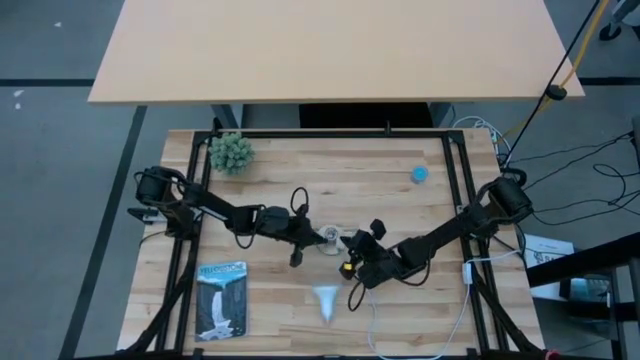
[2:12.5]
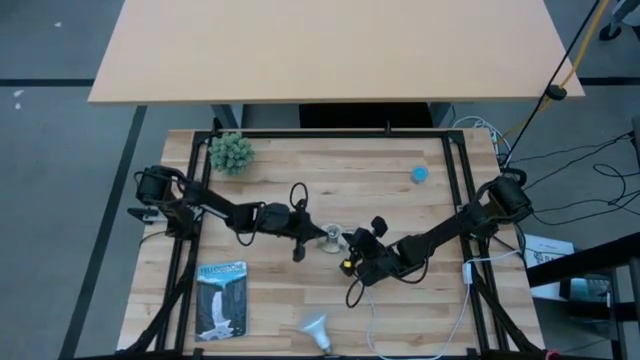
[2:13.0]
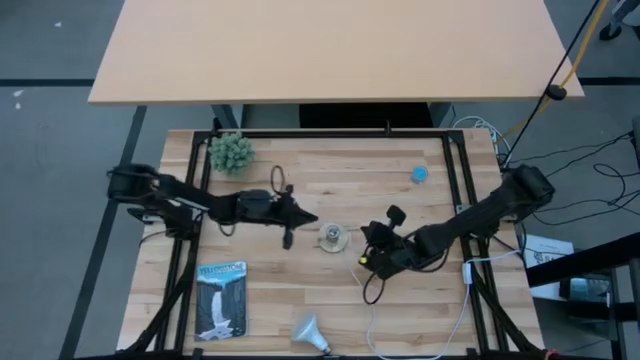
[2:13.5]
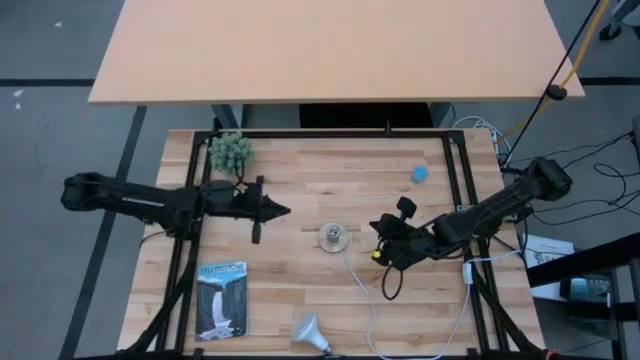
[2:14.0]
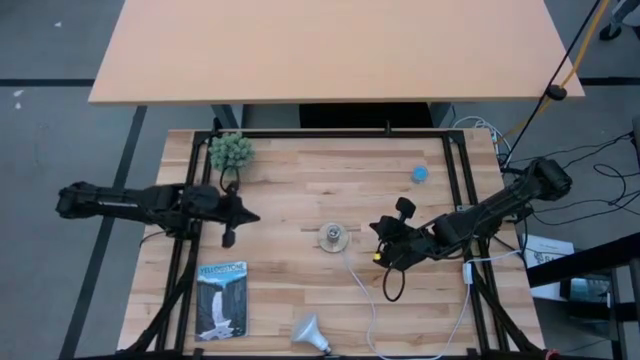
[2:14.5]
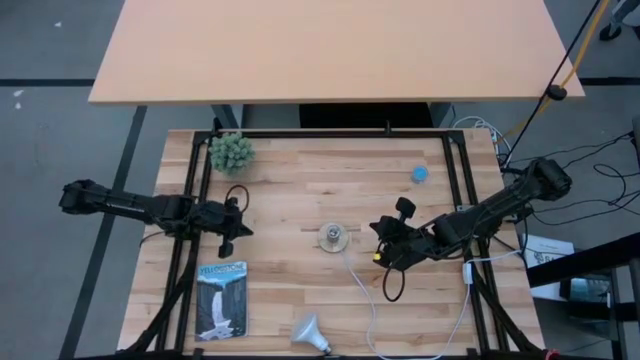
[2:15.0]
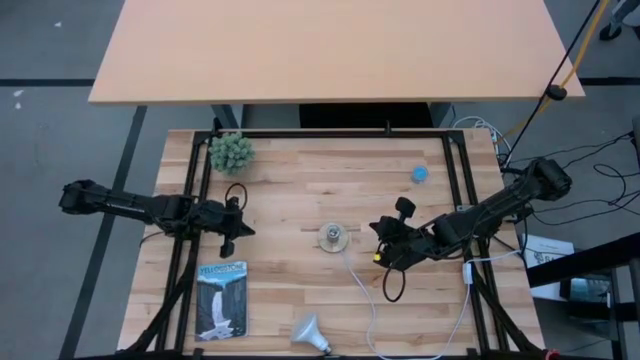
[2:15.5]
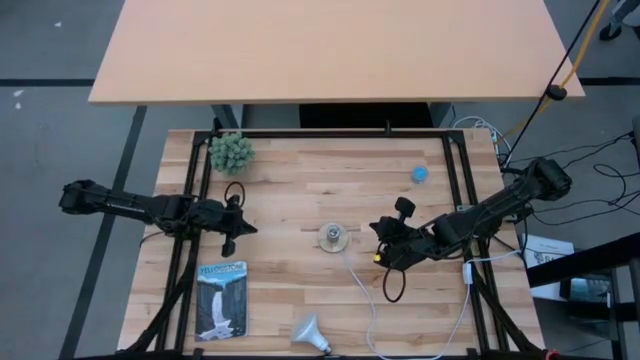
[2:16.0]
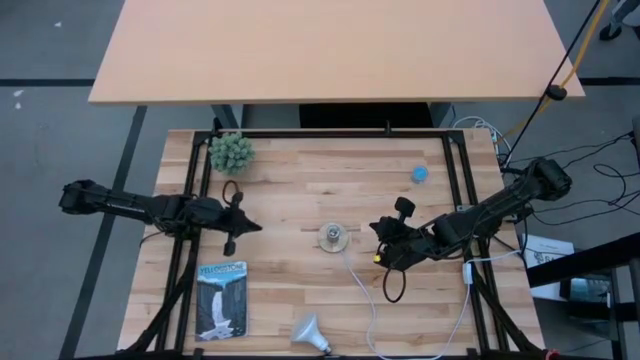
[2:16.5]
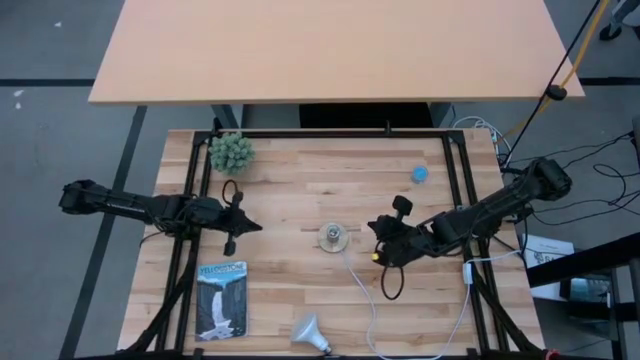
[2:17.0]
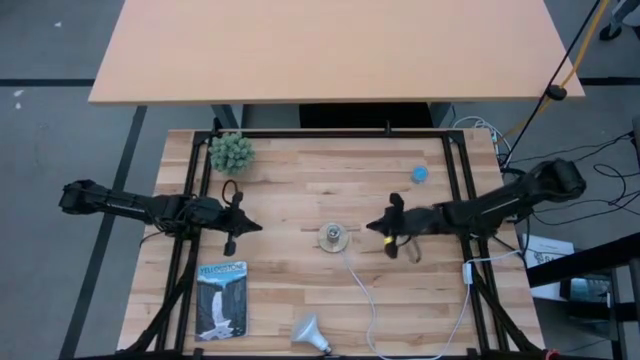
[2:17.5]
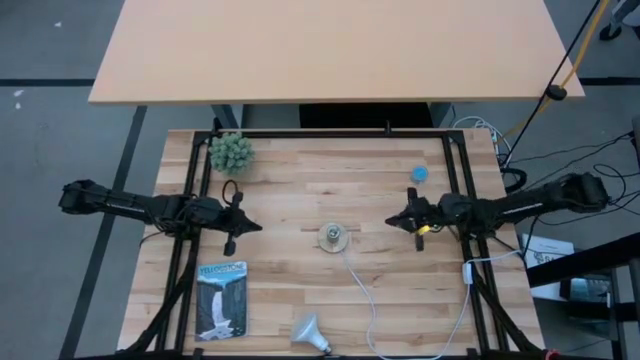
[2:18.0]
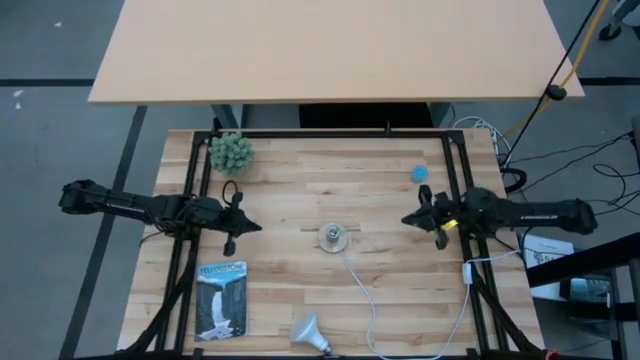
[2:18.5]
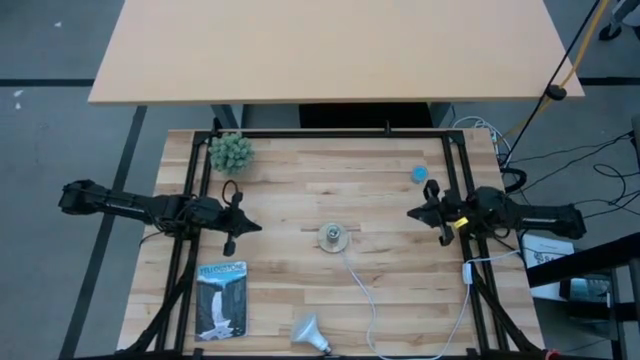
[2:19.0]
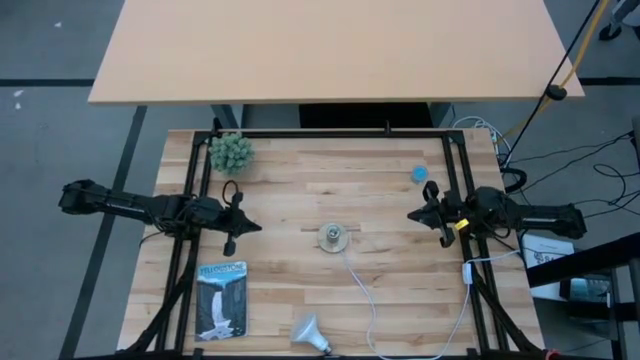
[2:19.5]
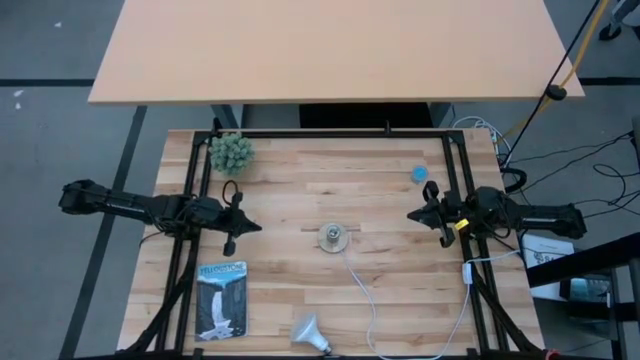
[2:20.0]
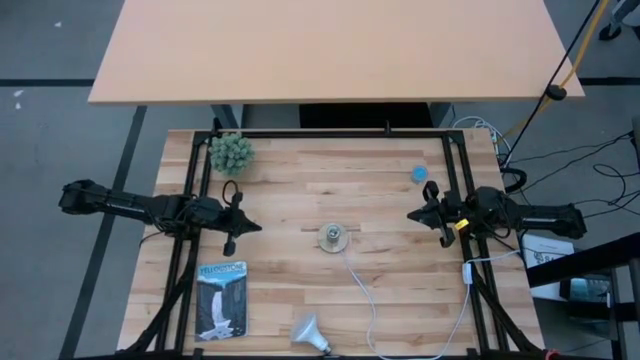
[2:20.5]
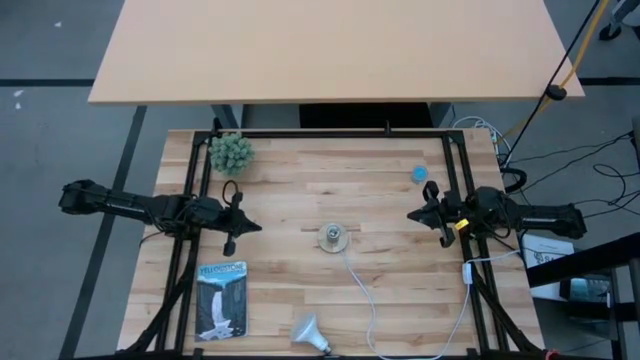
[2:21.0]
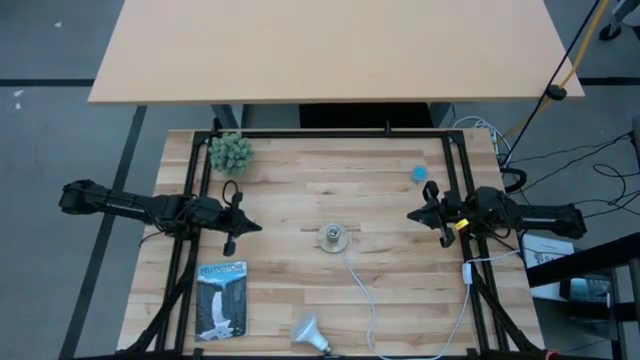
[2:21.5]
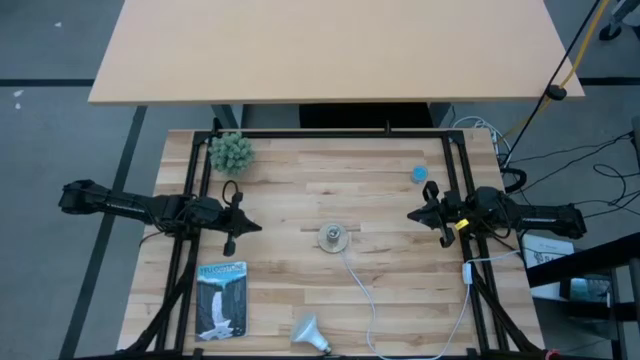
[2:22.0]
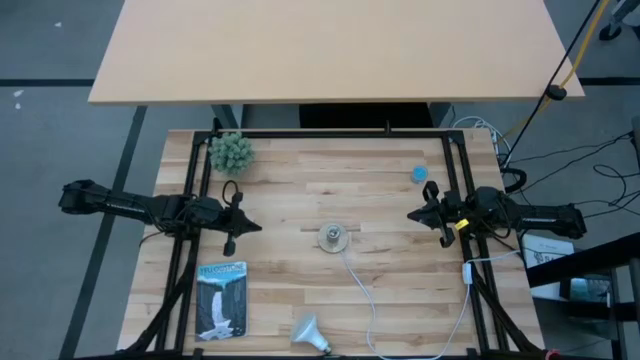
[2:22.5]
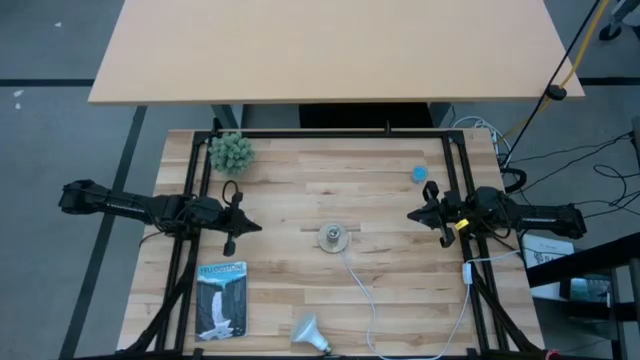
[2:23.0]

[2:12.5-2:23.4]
Task: Screw lightbulb
Return to Home Position

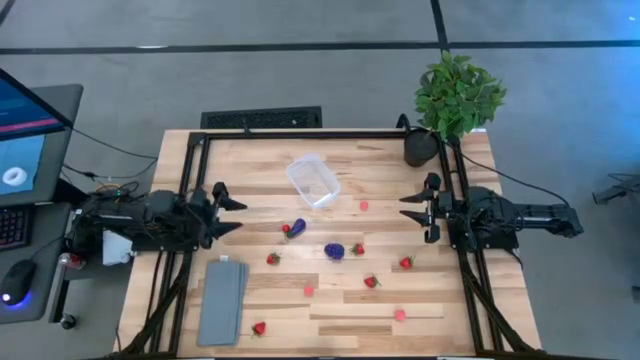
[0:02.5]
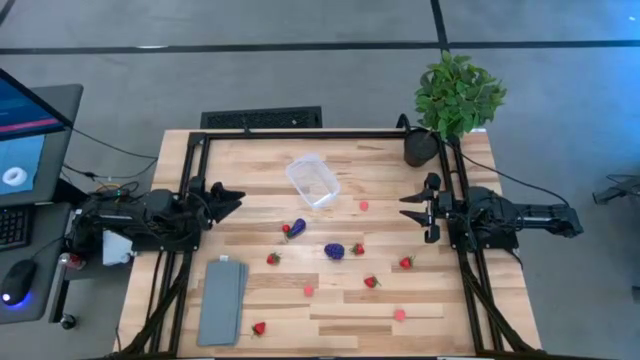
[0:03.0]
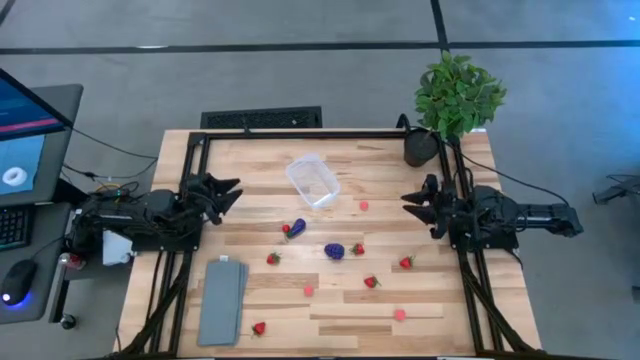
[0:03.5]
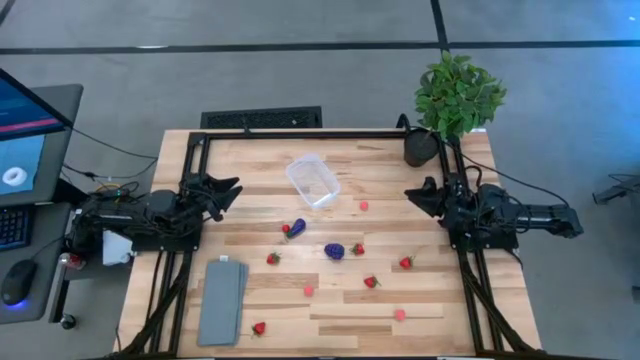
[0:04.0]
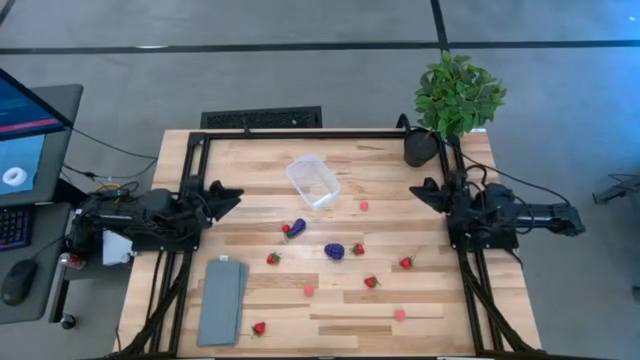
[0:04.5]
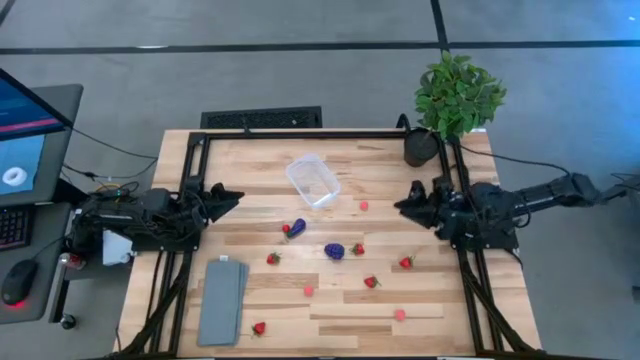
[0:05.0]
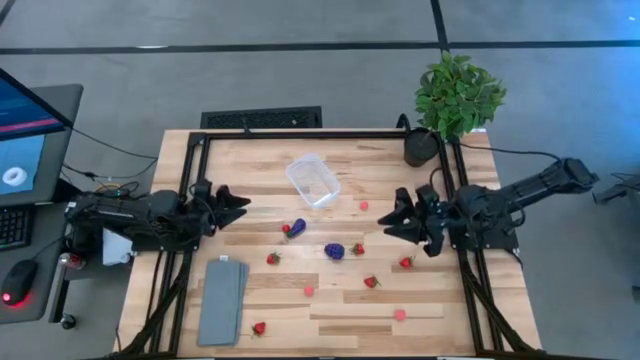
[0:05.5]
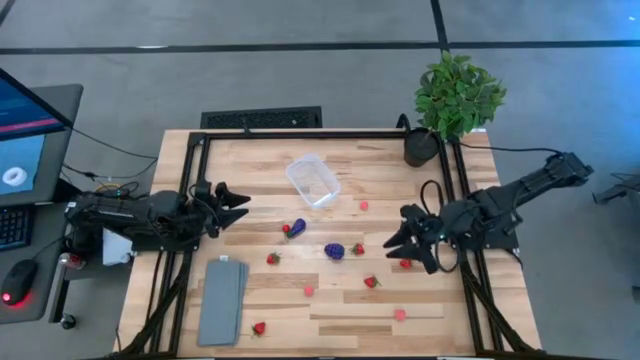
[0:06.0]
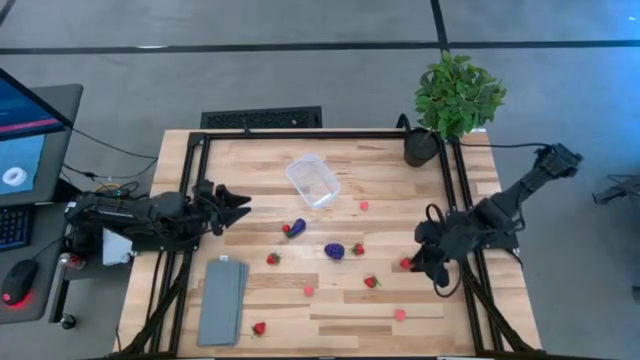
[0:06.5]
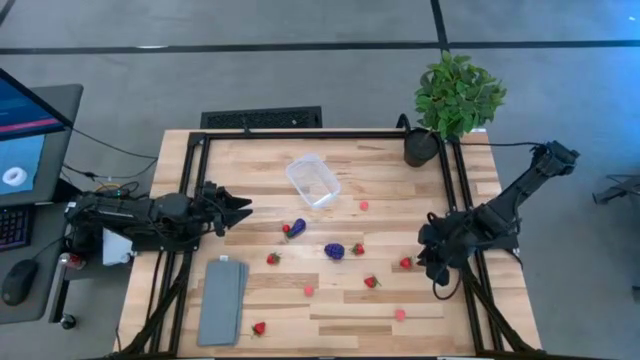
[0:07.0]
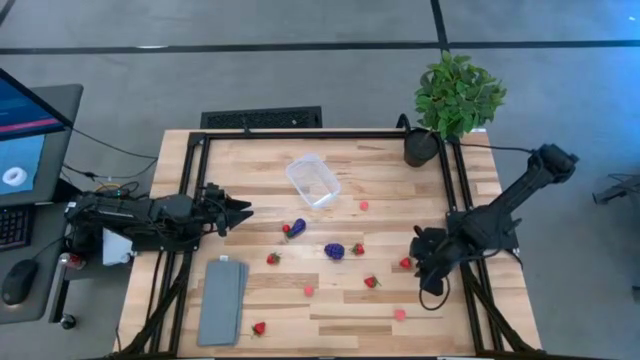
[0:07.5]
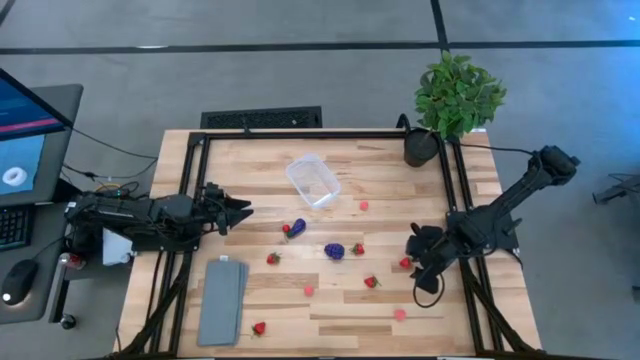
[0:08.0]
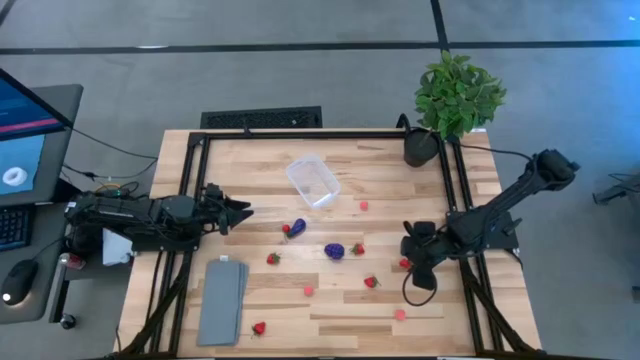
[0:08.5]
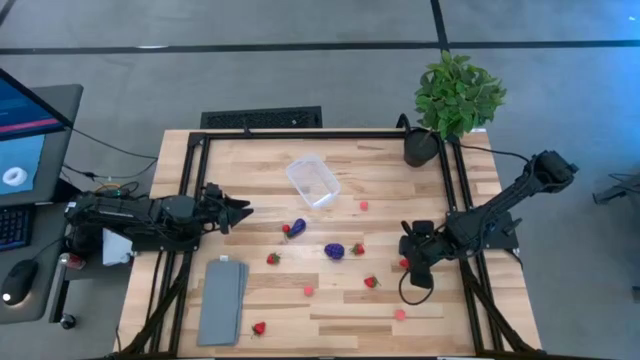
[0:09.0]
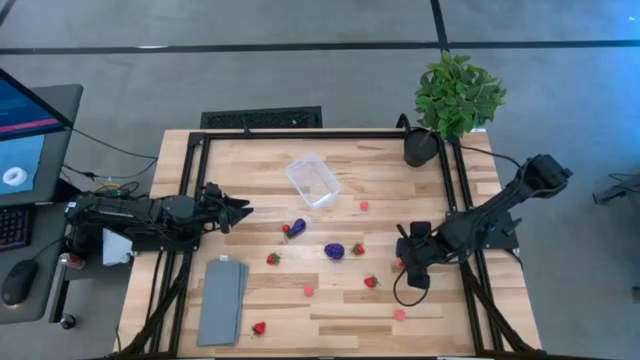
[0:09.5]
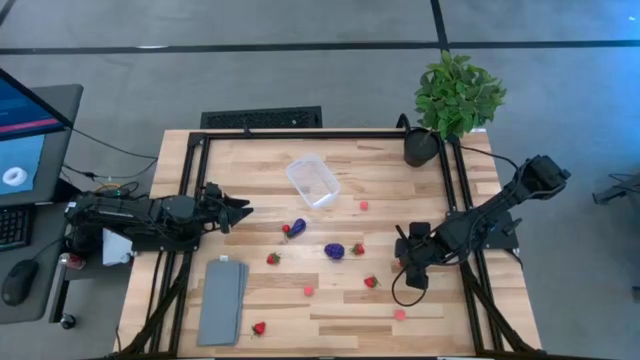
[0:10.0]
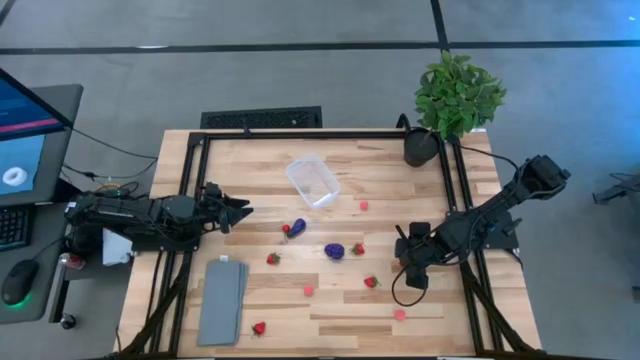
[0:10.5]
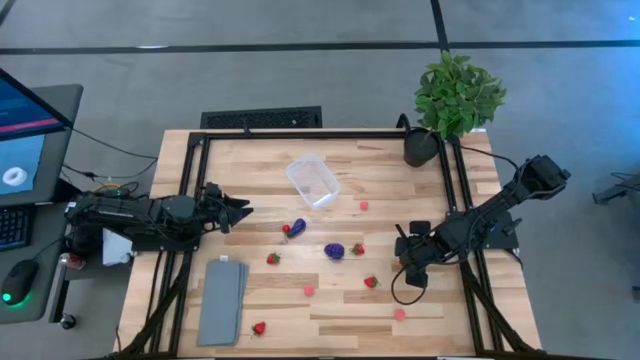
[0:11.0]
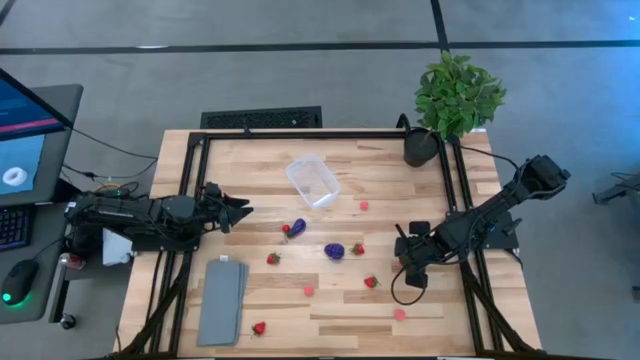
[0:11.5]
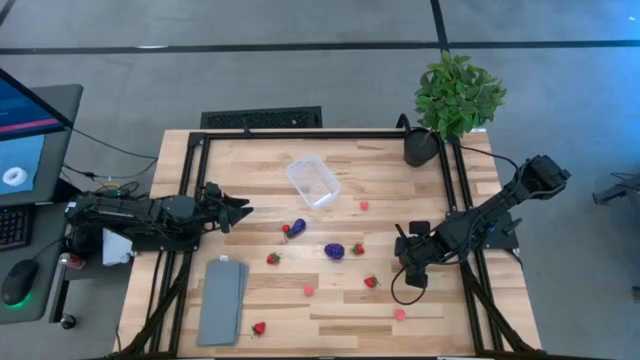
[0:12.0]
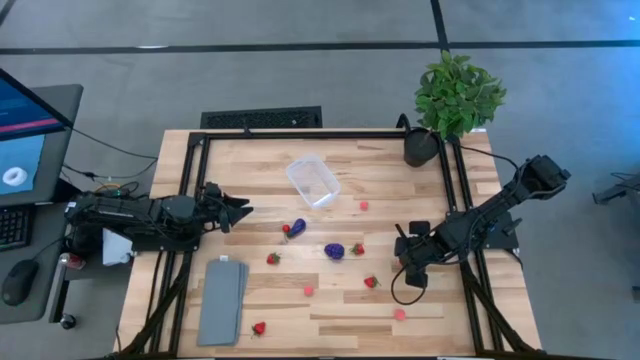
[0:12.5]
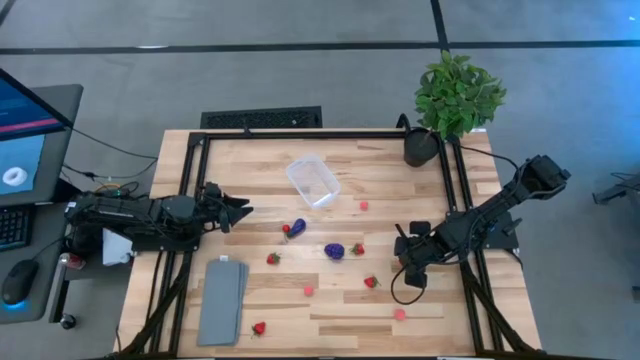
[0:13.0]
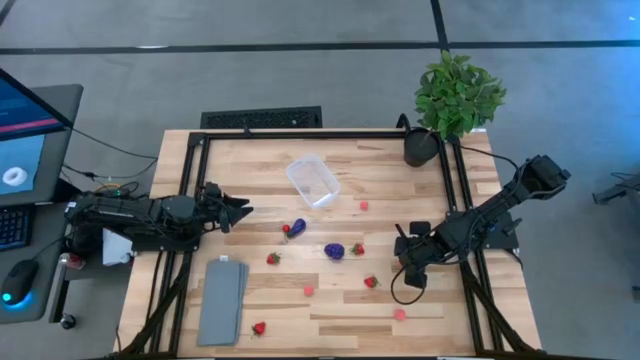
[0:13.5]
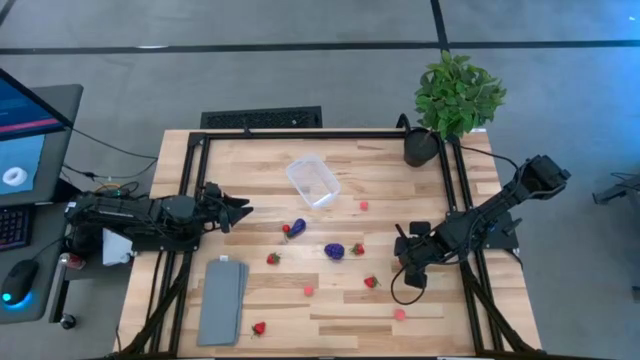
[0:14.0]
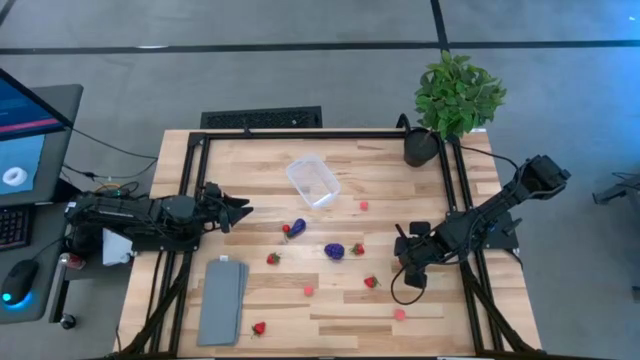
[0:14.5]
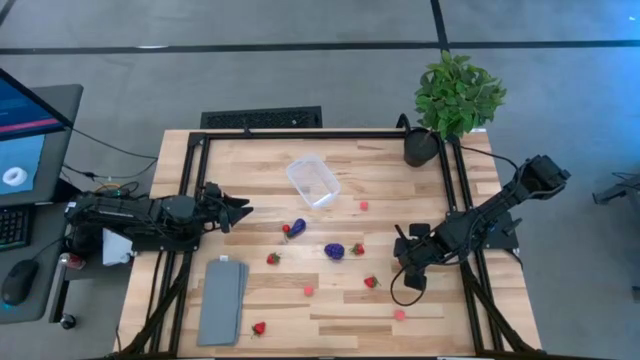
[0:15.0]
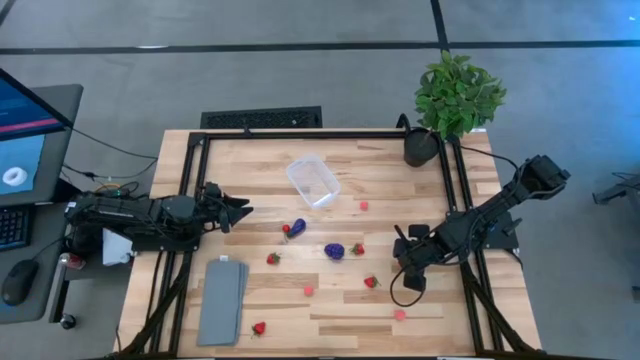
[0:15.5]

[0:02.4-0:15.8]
Task: Pick and placing Produce into tupperware
Put the strawberry into the transparent container
